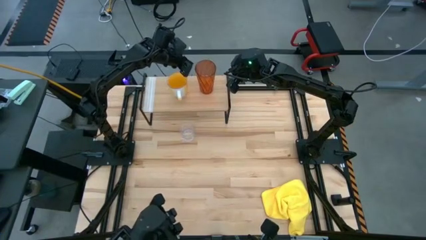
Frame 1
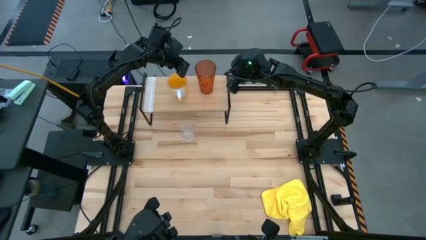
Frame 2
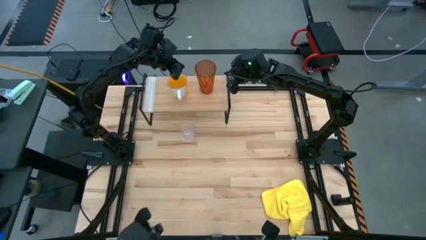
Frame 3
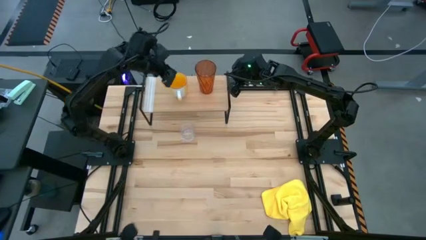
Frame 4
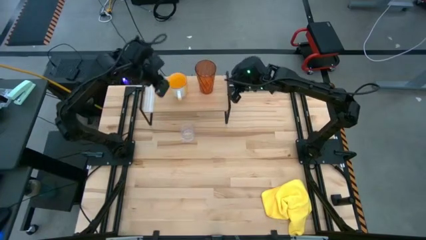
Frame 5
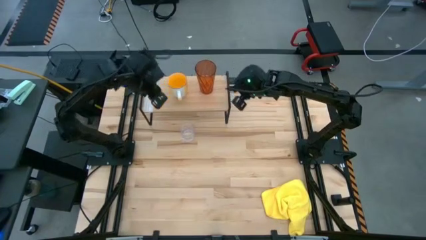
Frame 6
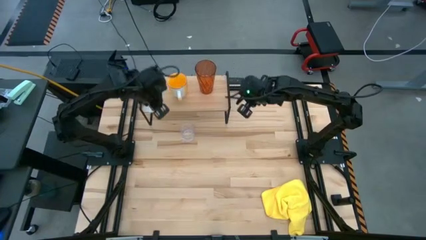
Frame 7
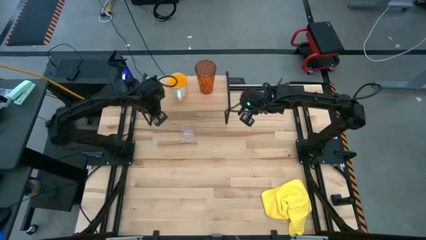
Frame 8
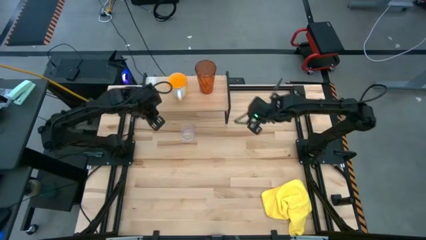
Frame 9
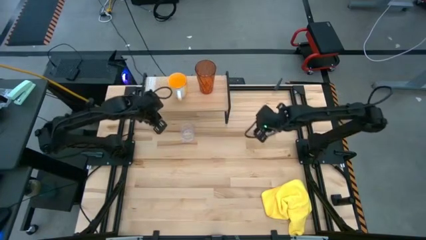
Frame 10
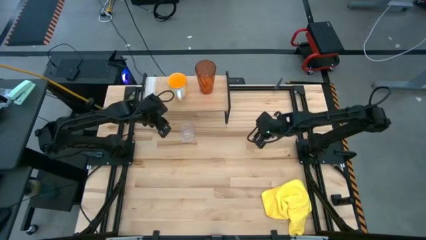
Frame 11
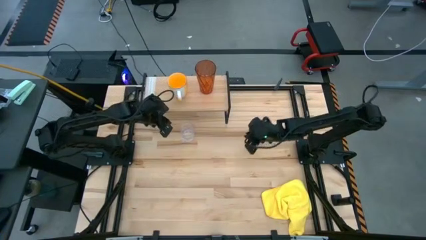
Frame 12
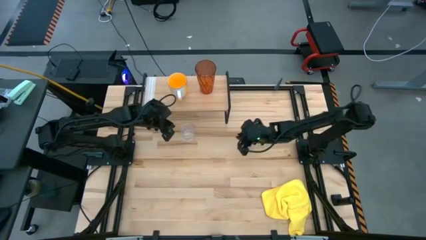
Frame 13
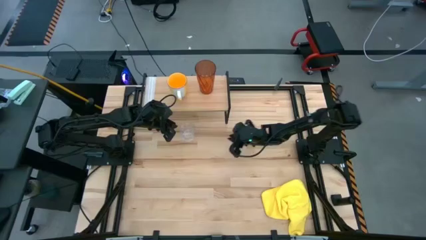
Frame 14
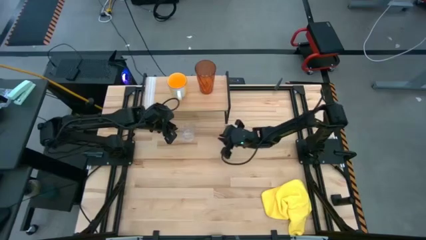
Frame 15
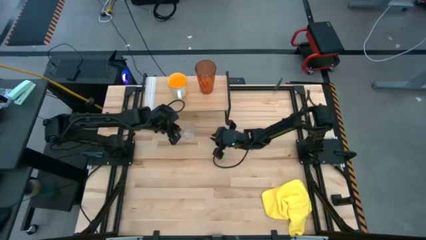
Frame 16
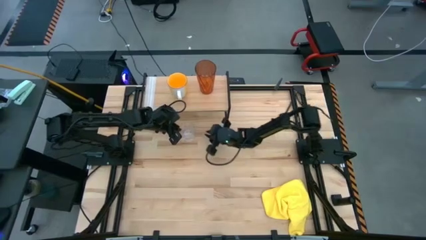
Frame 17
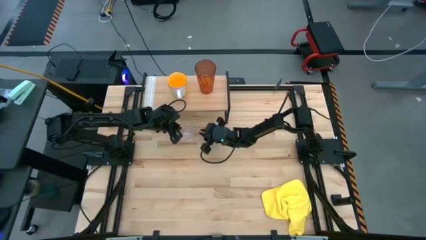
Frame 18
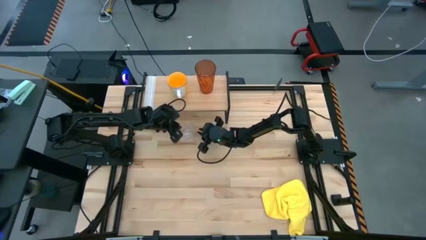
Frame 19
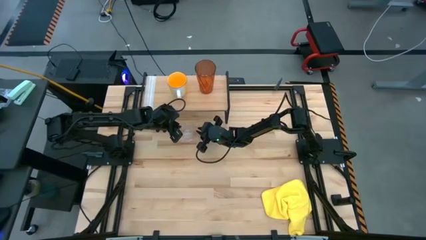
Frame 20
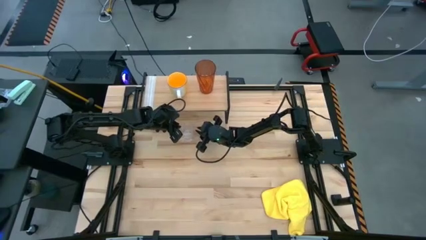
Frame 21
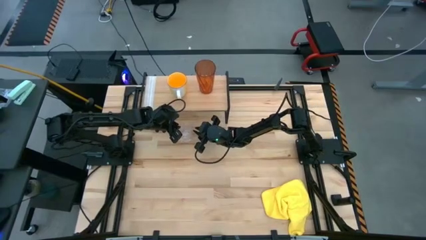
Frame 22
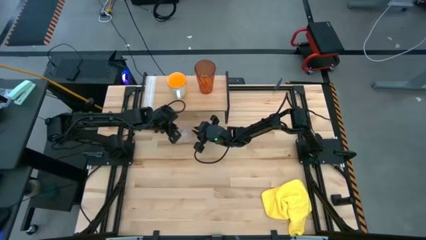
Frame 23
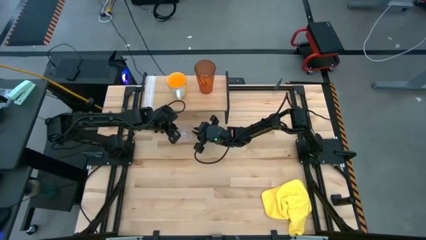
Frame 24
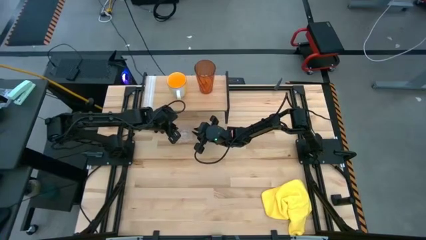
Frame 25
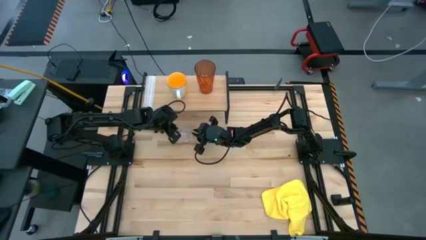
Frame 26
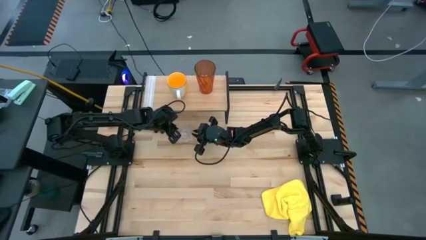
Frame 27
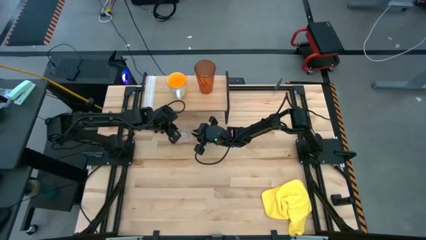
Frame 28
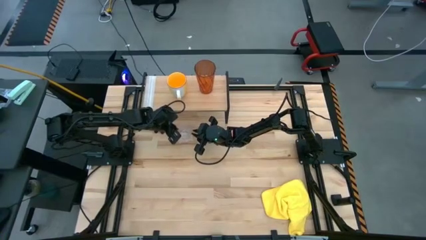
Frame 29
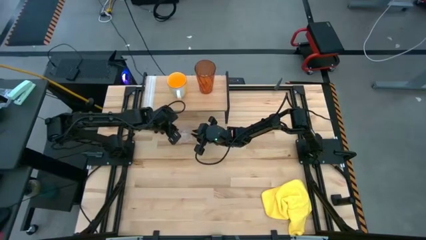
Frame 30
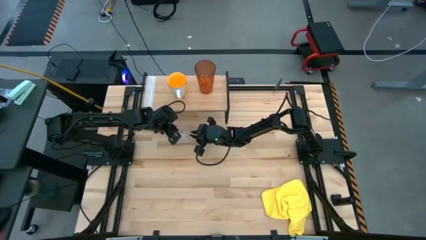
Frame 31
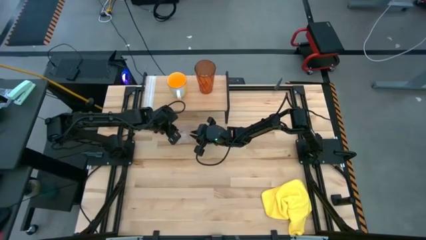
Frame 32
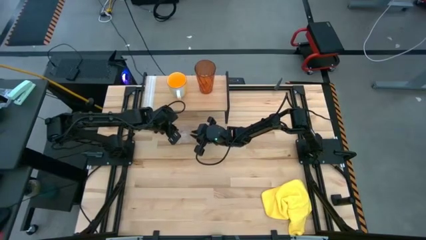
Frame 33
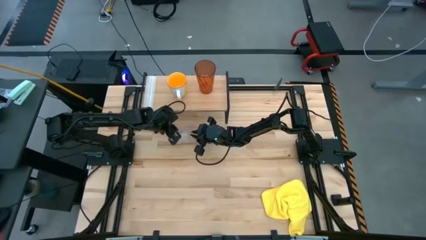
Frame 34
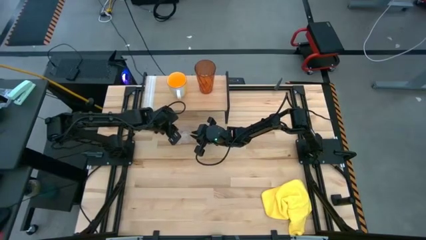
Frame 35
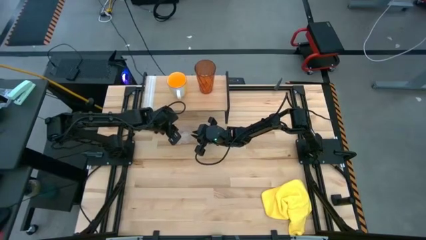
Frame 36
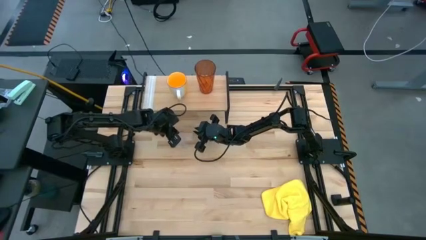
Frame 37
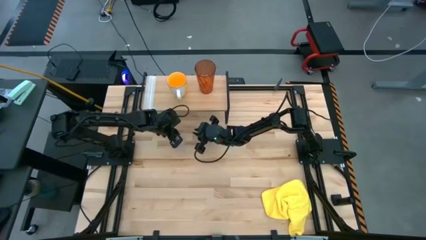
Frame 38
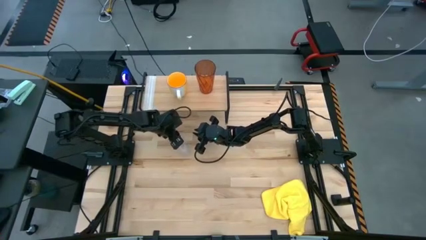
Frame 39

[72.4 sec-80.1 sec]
Task: Stack small to large cups/mugs on shelf
Put the transparent mug on the shelf

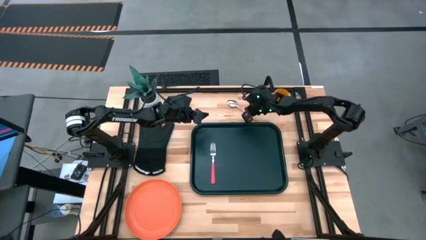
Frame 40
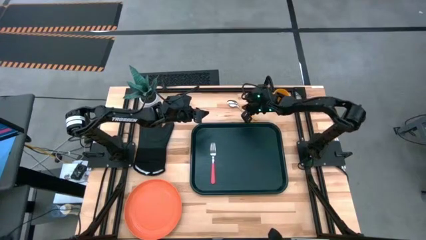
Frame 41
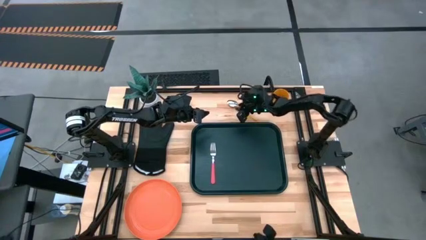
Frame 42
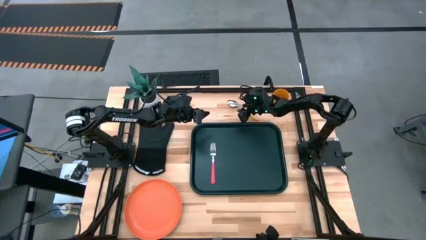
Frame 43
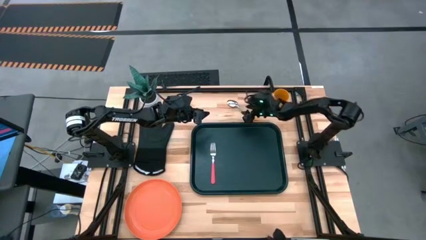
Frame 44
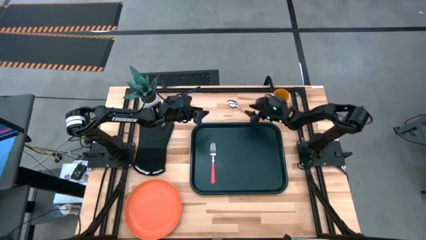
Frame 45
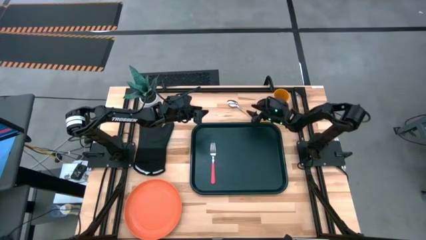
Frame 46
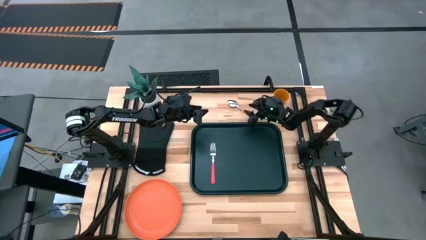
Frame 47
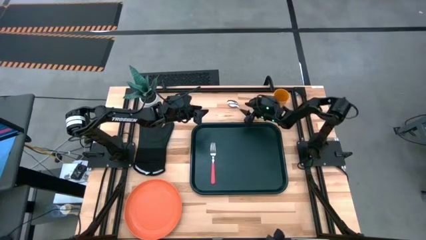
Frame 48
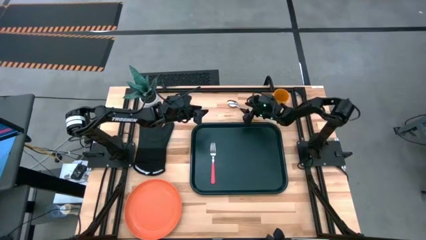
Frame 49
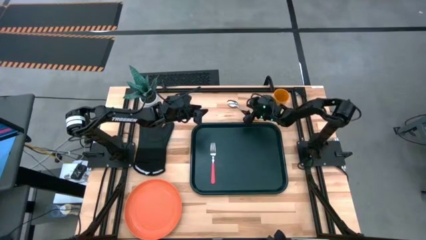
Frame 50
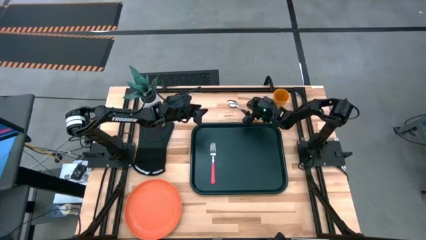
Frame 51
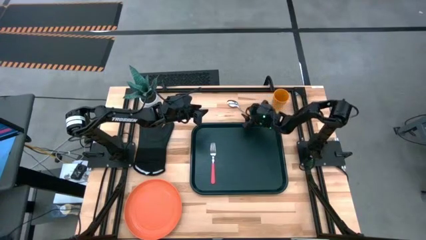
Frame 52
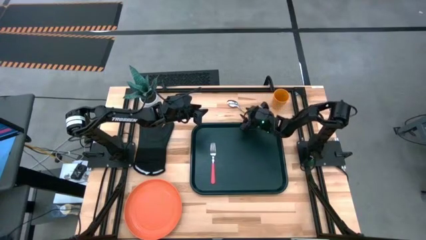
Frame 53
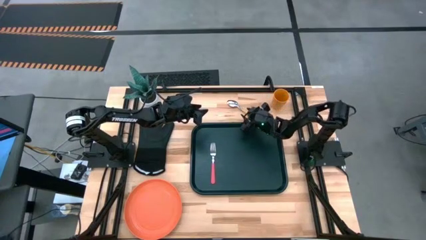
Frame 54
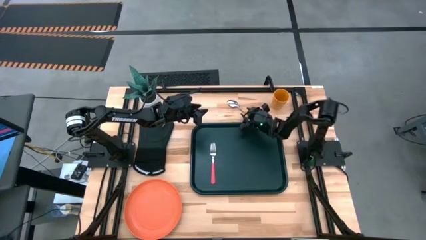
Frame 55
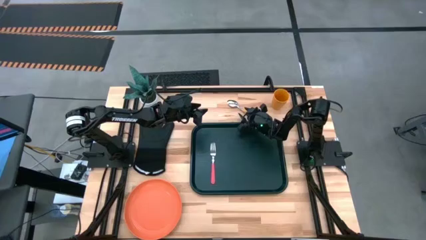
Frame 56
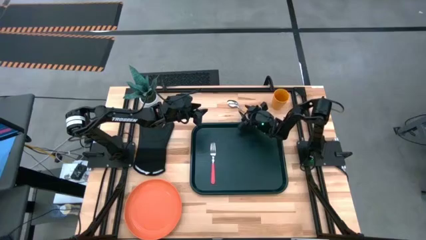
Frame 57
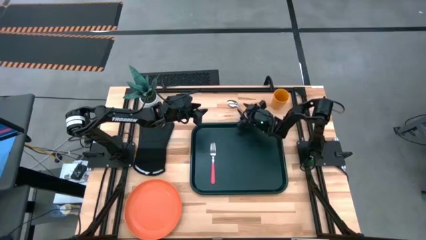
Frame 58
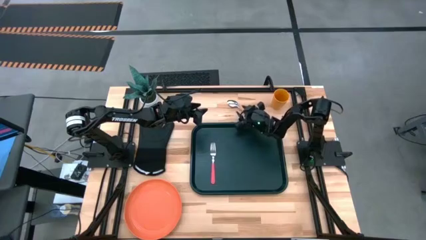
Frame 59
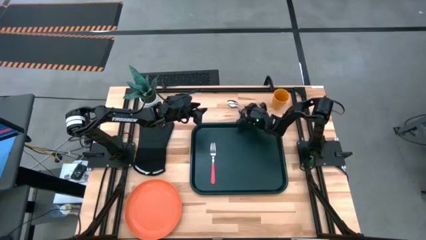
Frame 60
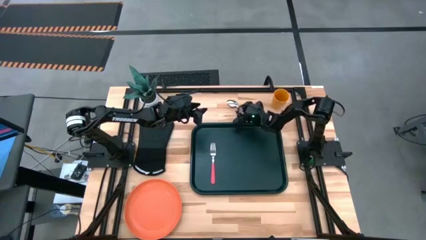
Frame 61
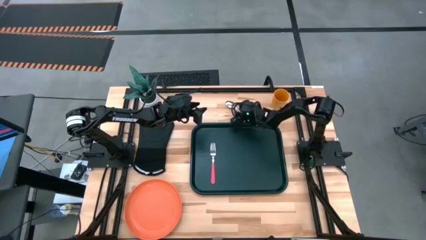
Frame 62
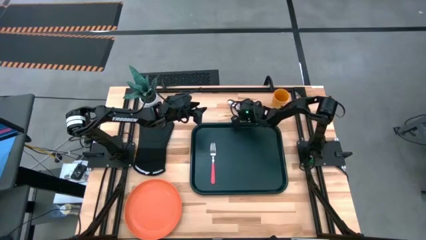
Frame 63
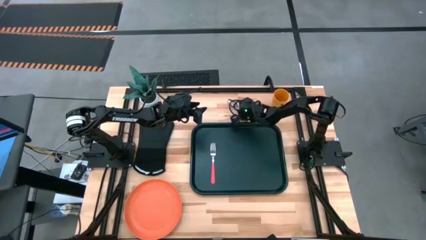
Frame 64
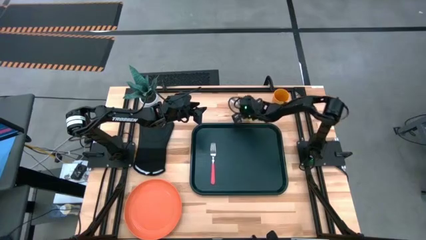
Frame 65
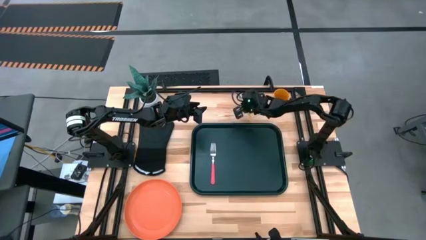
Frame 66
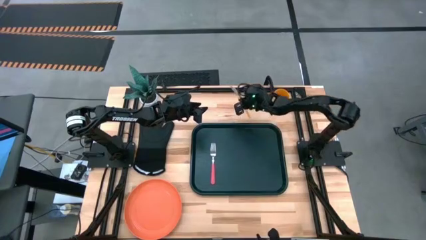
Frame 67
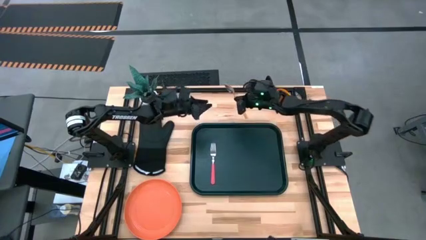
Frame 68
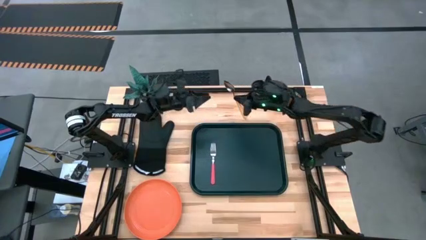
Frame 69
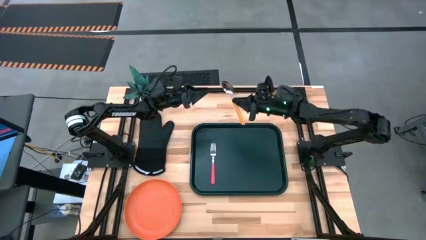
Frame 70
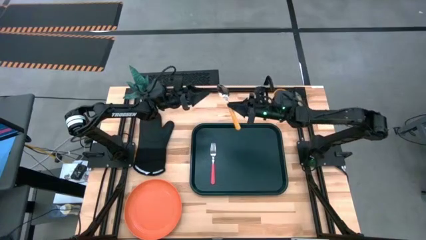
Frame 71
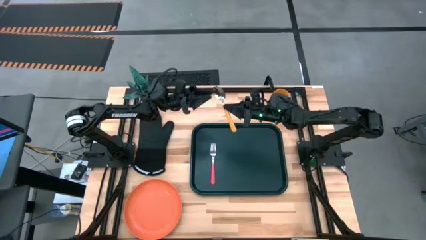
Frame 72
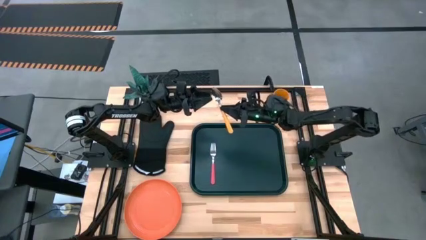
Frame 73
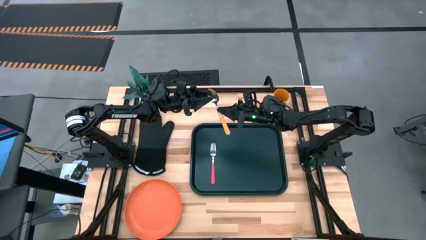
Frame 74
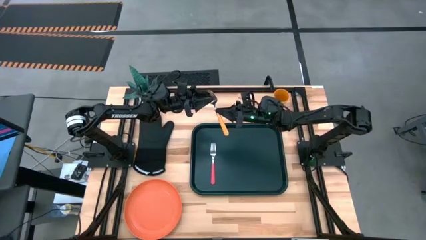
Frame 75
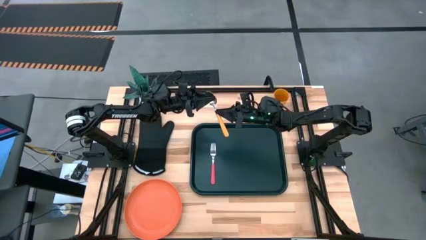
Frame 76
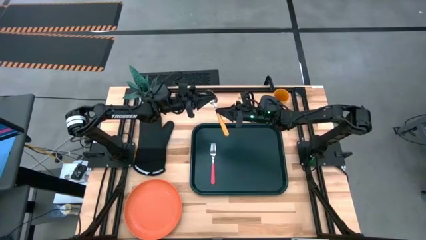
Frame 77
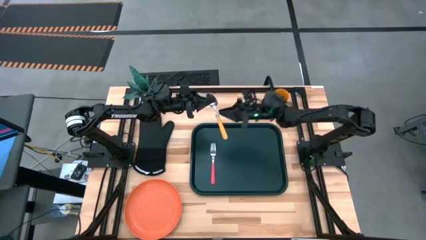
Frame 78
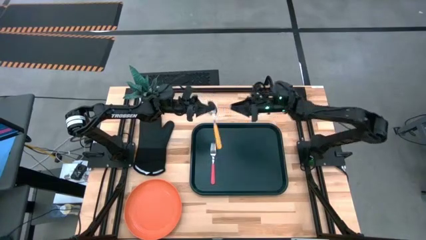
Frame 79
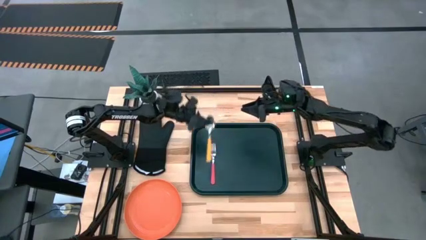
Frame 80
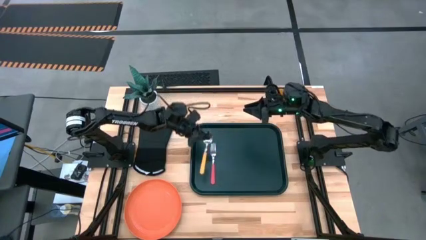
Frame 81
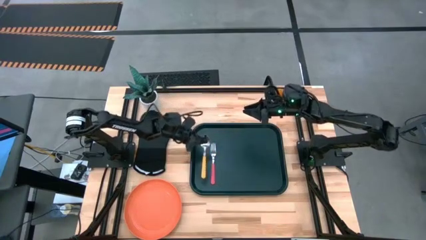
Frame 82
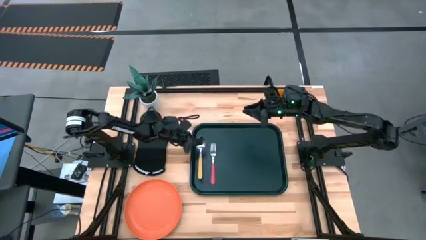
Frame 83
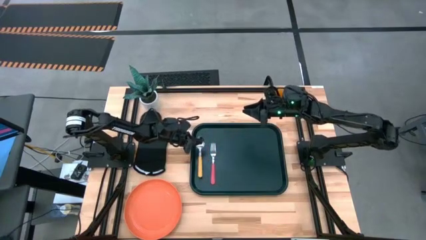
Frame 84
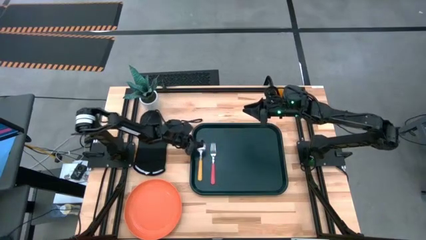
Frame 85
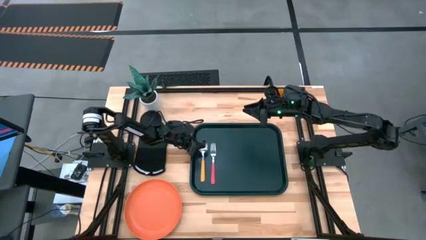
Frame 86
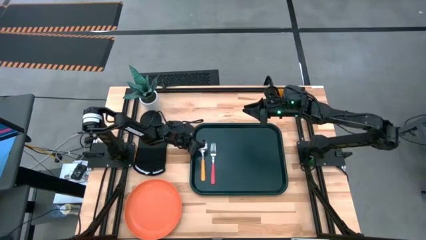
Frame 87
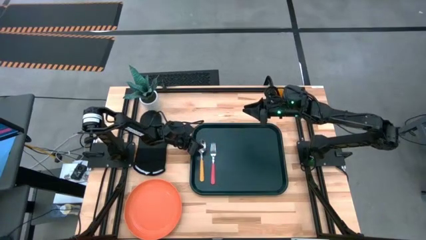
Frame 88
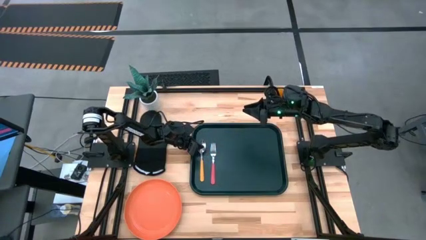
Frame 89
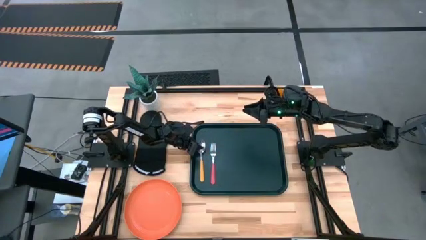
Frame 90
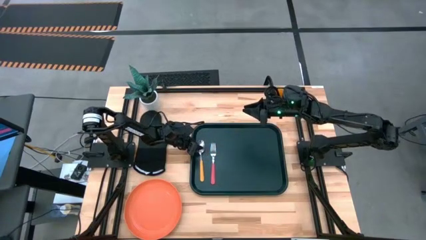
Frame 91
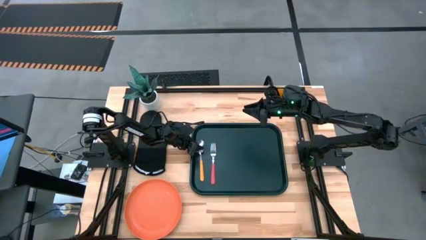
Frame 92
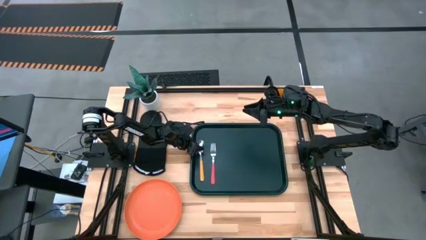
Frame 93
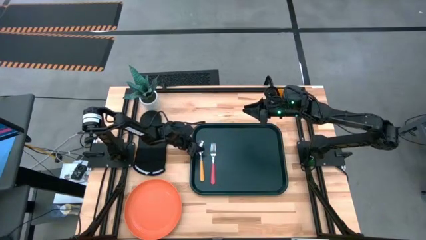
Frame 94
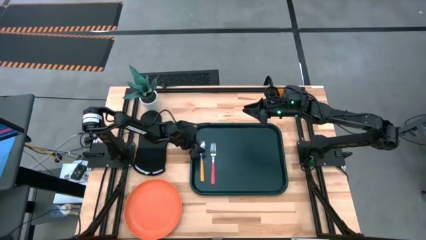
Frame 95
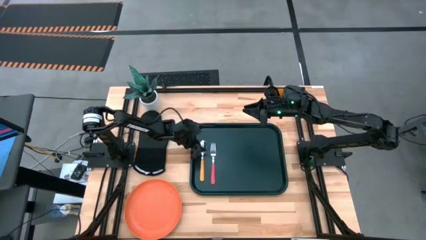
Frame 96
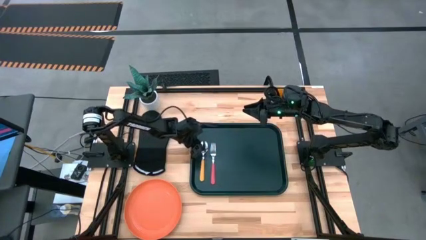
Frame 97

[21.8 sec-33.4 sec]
Task: Pick and place plate/cup/fork/spoon on tray
Put the yellow spoon to the left of the pink fork on the black tray
